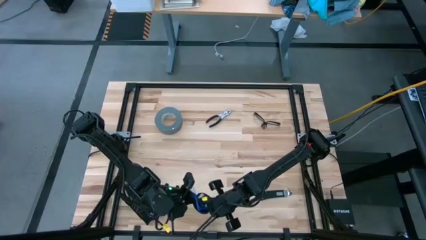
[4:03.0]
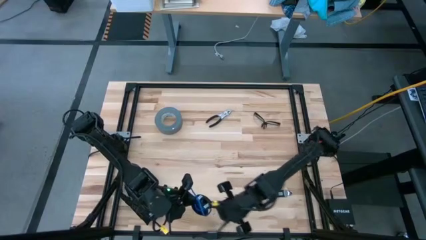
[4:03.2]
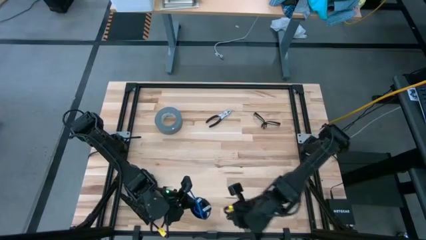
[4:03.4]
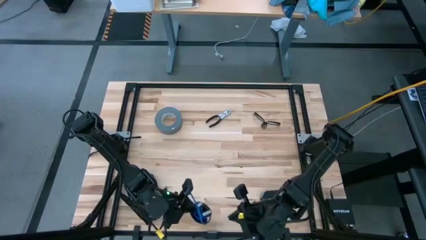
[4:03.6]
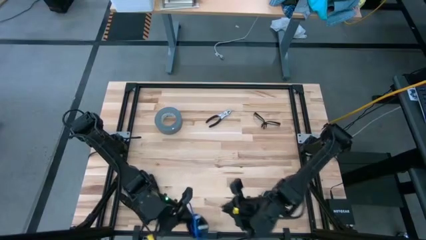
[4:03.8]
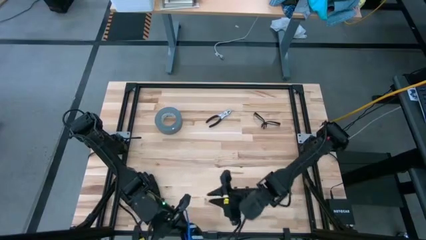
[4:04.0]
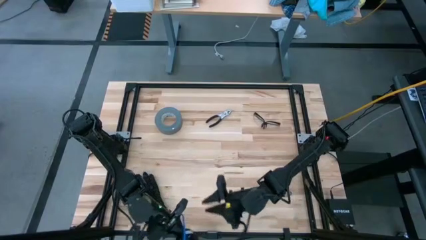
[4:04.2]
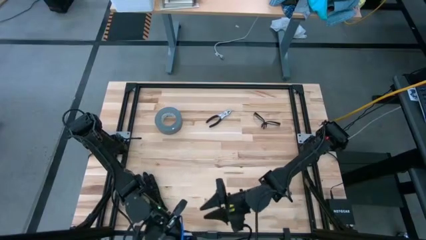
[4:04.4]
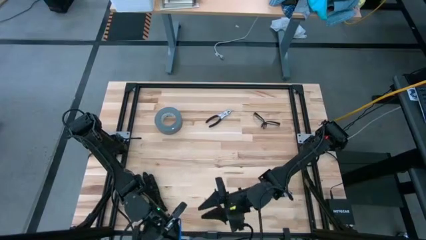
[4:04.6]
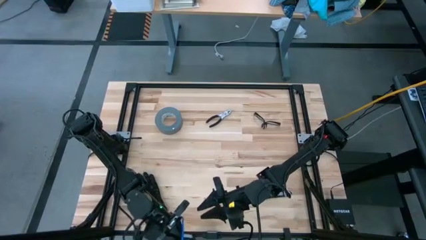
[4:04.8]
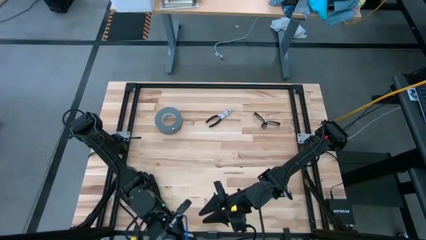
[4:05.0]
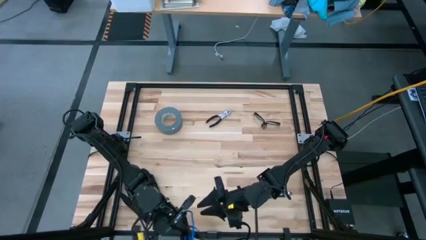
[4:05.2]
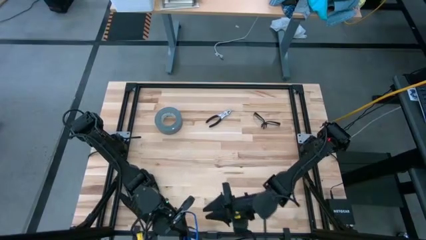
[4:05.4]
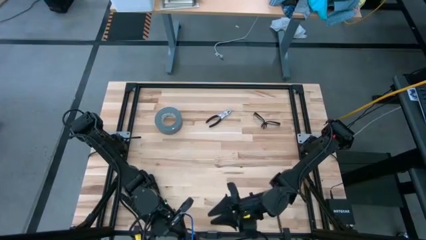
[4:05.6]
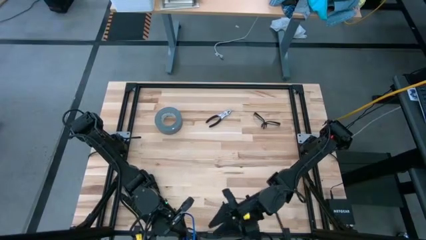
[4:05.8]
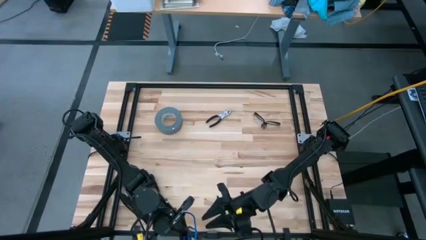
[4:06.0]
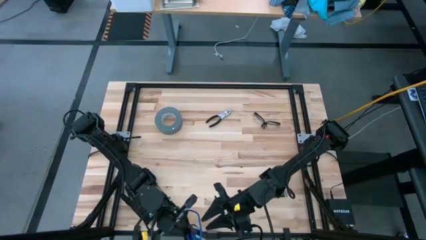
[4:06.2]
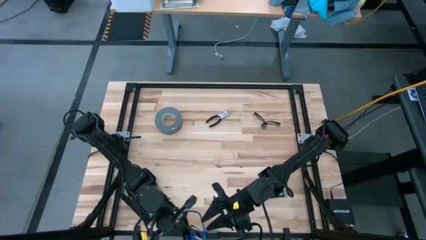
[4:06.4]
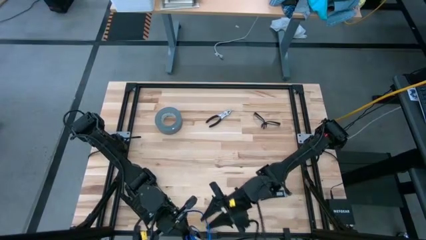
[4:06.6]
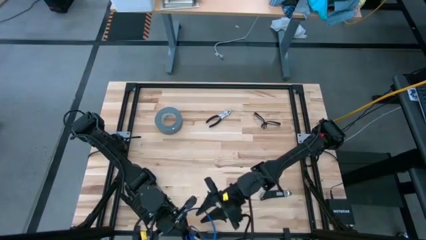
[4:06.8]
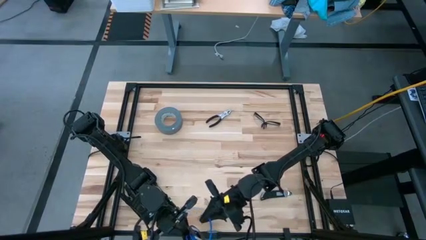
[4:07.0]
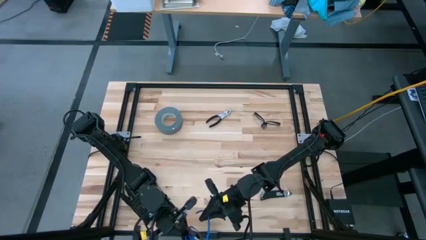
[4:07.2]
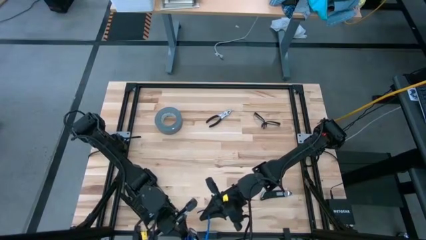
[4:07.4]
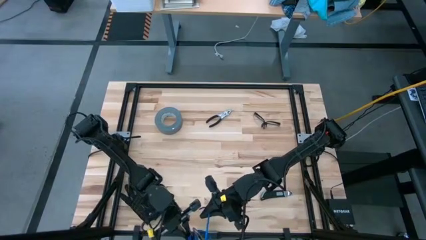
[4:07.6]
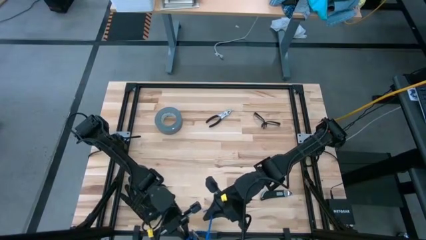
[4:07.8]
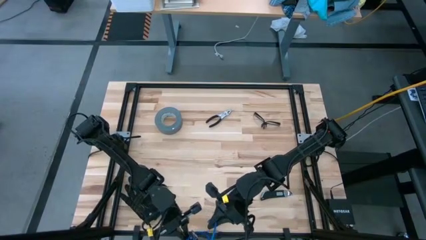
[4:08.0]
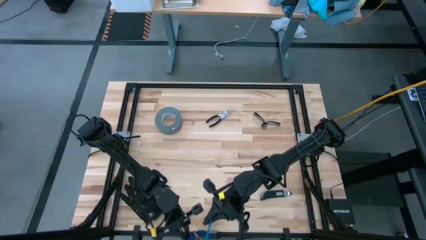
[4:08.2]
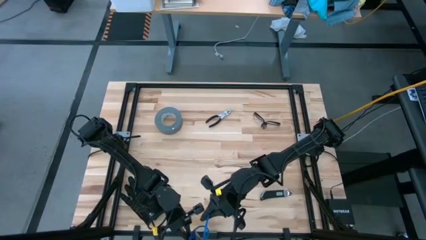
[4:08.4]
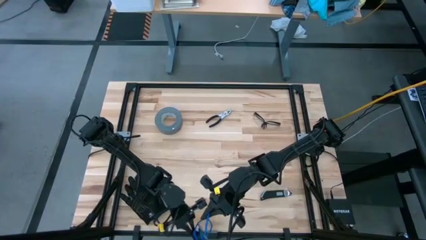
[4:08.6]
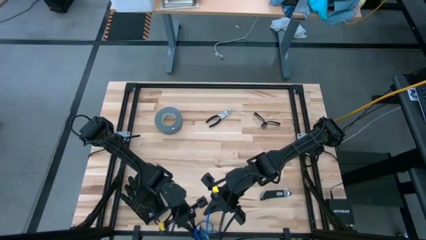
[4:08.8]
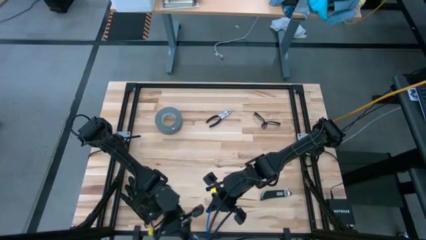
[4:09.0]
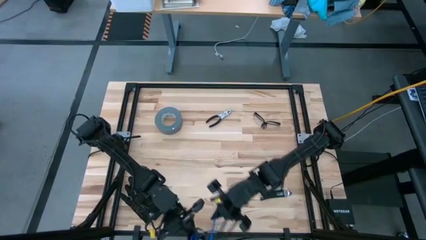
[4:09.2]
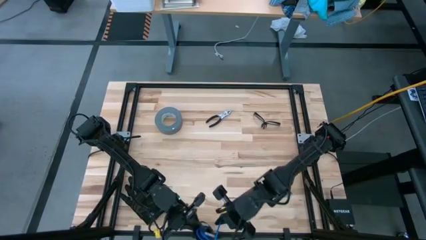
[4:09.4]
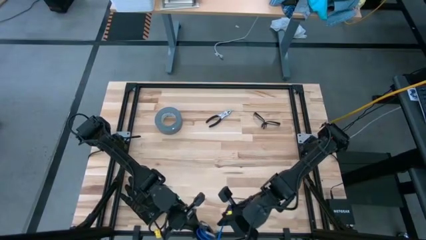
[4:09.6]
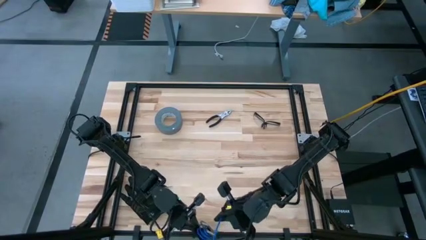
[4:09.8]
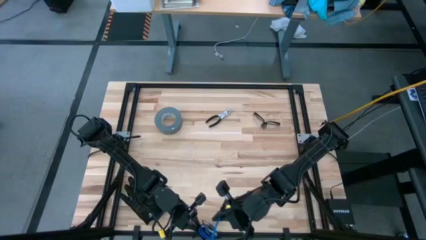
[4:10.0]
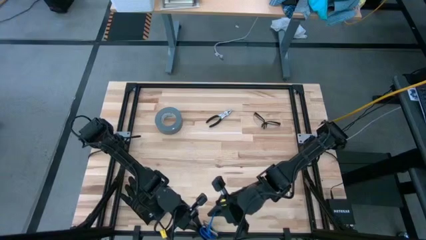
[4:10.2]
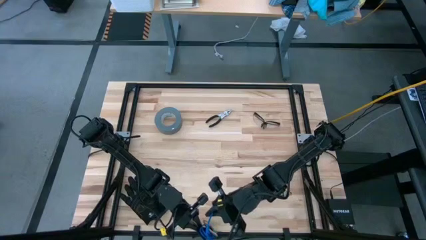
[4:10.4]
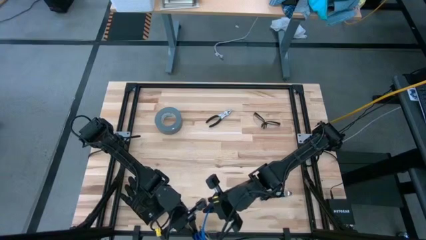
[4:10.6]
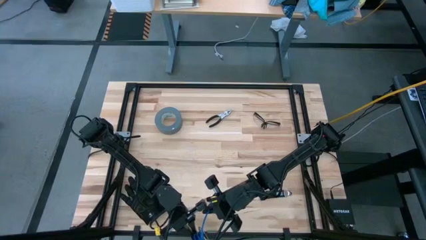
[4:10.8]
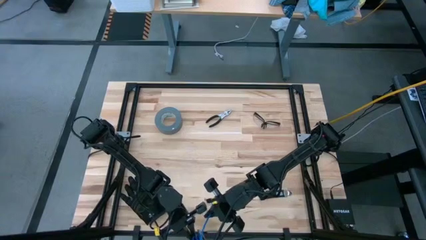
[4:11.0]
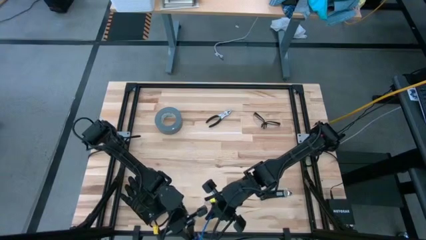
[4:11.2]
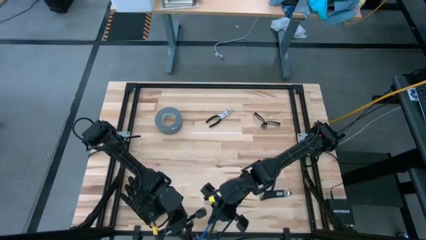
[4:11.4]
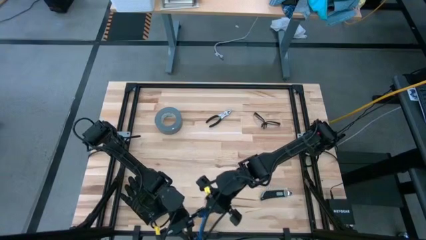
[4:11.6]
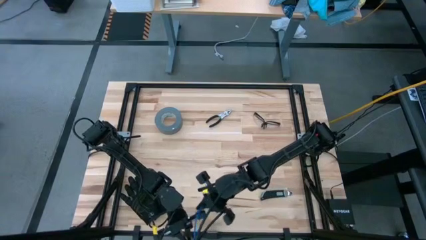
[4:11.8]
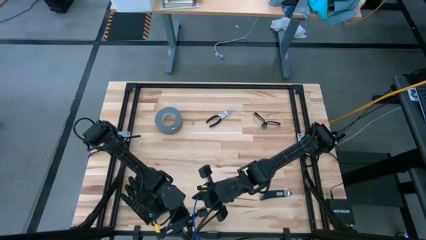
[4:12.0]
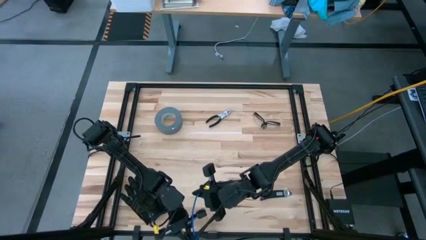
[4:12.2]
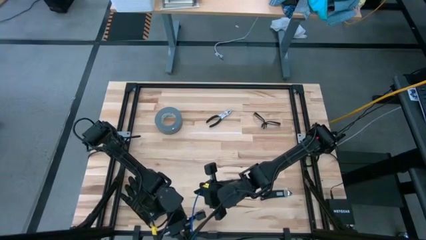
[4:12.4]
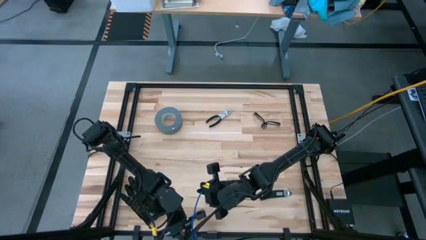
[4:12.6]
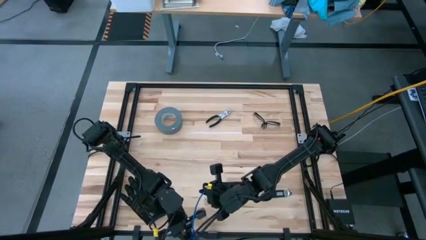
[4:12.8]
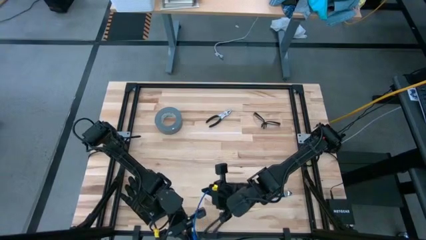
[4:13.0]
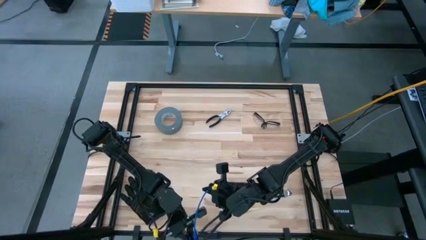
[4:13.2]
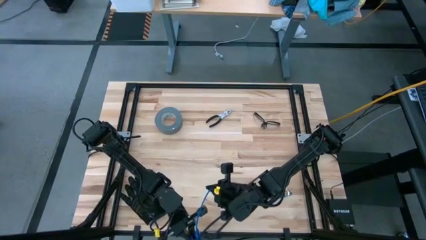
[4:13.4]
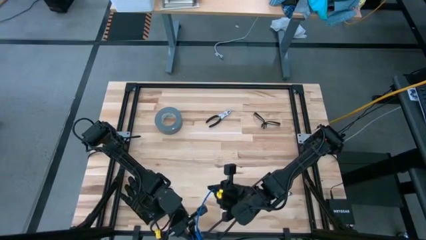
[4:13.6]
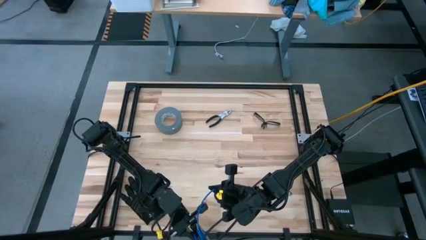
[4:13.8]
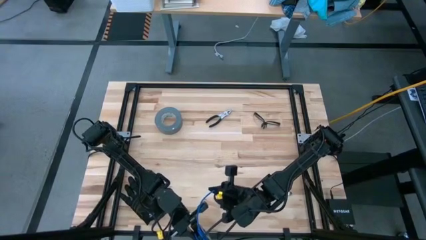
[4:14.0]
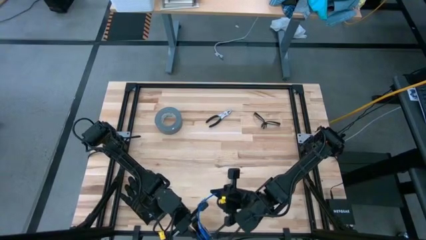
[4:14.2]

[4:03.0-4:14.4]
Task: Coil cords
Coil the blue wire cable onto the black spool

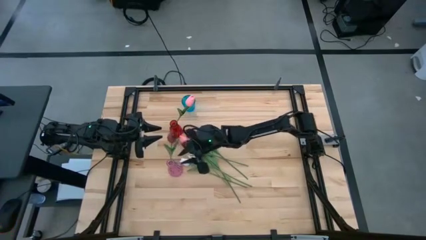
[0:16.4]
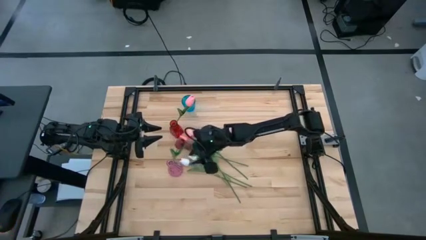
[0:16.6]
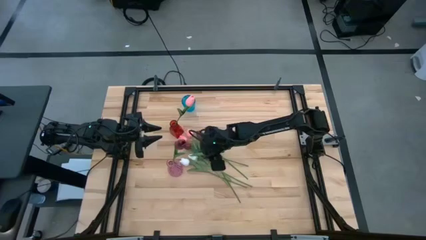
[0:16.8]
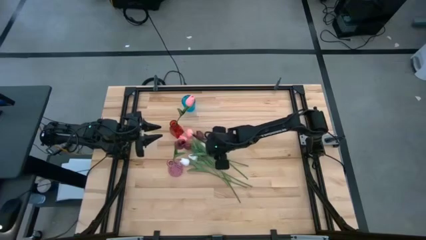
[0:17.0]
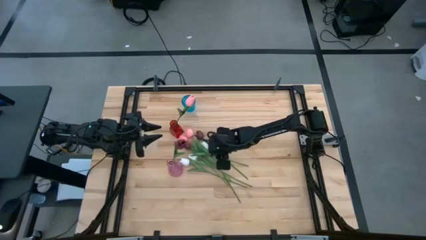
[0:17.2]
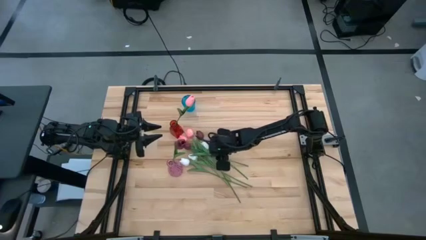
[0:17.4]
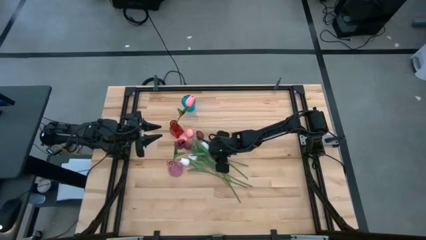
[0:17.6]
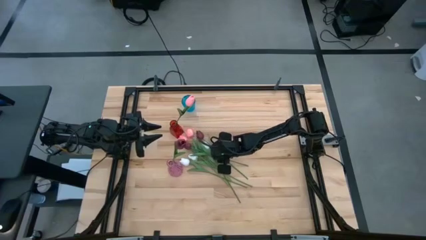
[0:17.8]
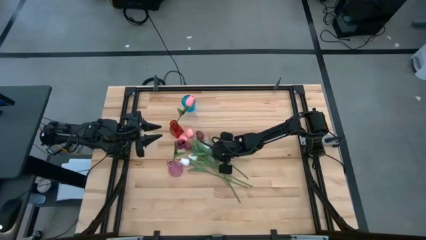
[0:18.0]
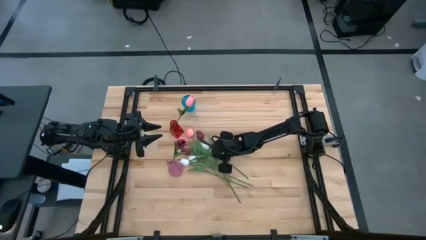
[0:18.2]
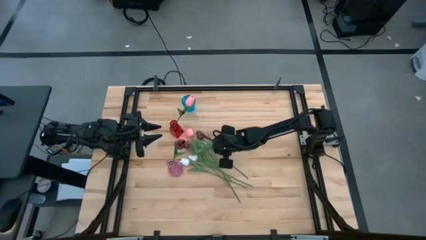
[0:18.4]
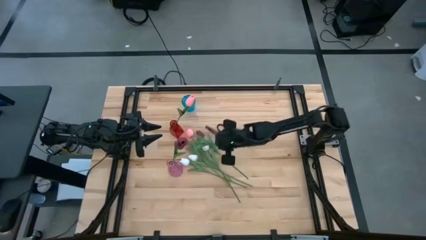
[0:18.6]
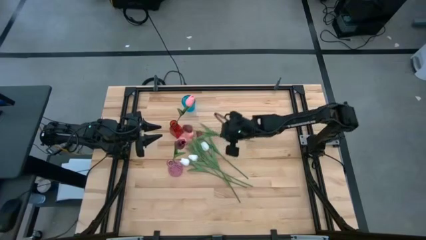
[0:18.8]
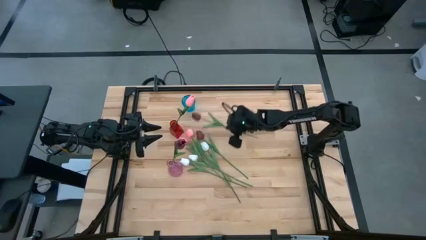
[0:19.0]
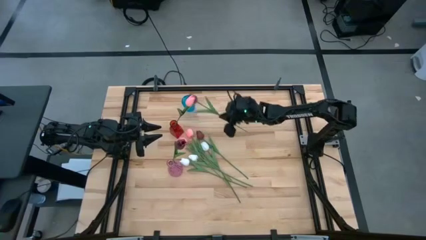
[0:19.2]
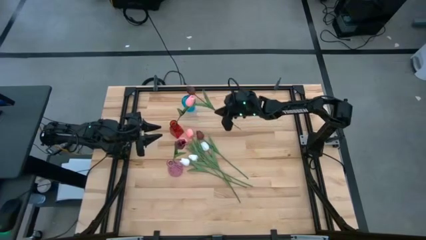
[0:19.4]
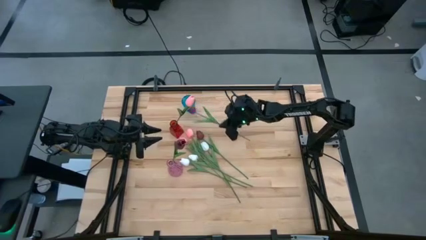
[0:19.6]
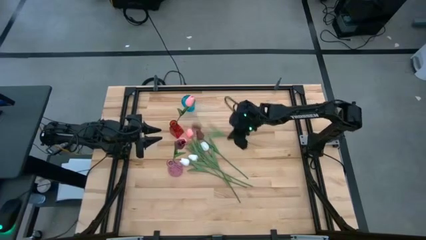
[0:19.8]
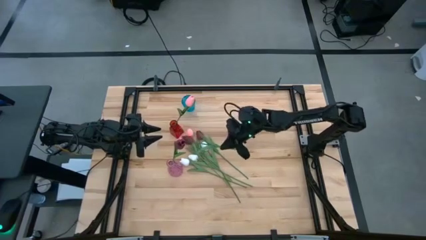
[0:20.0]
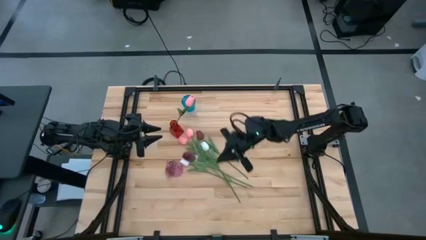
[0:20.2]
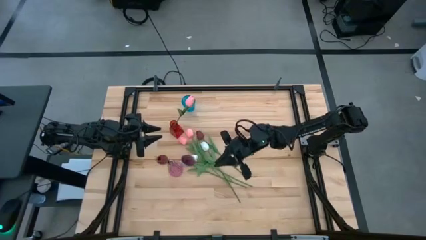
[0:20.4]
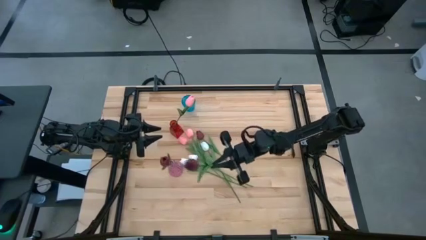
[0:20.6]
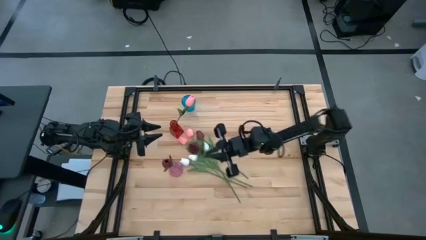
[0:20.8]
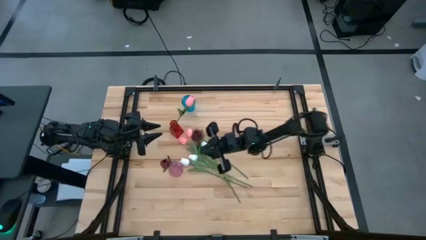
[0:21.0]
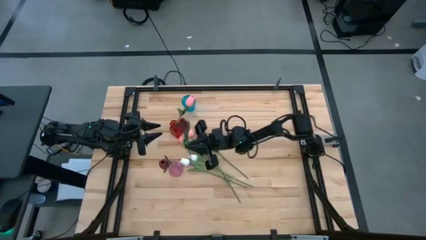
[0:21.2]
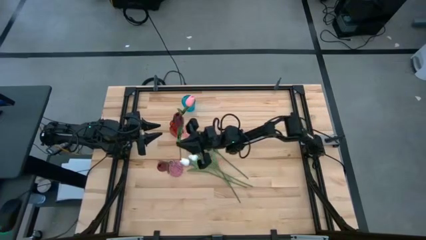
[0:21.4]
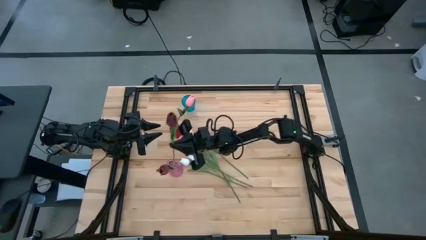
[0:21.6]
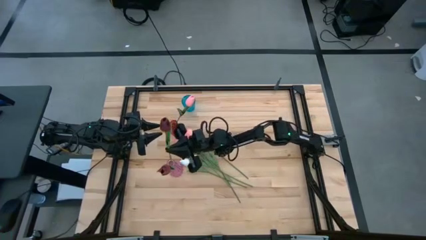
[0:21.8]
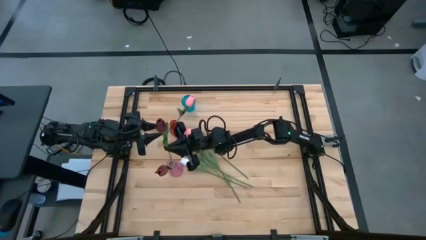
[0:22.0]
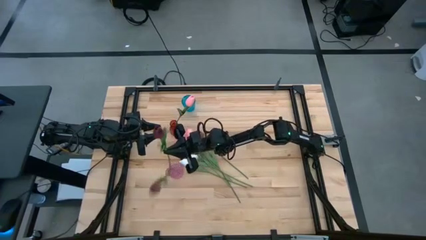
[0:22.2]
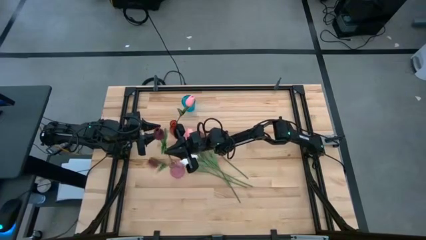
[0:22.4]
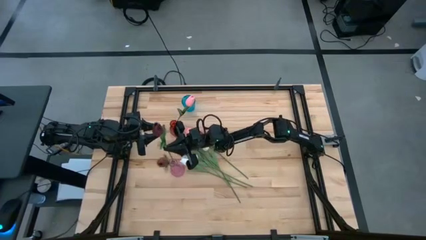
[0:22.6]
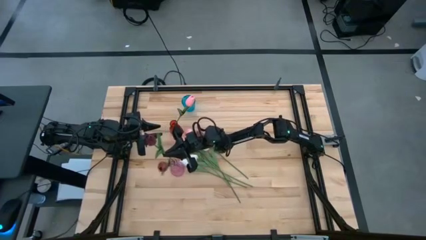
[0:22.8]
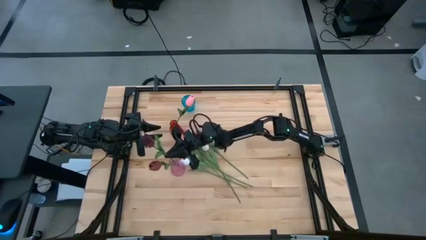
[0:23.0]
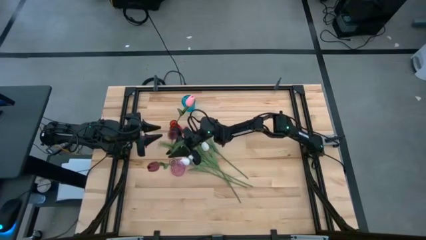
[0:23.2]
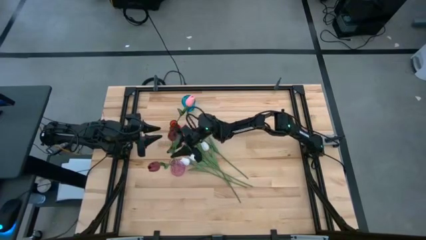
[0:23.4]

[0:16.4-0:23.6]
Task: Sort flowers into vase by color
Put the red tulip into the pink vase
